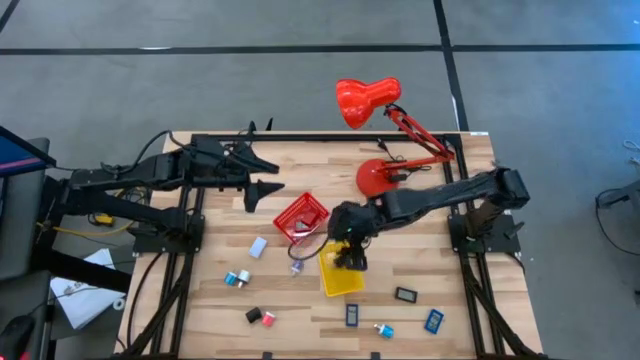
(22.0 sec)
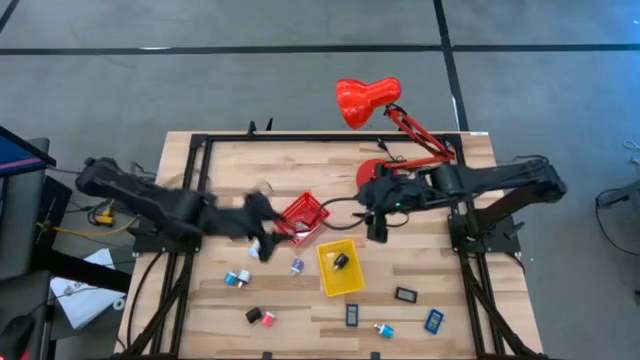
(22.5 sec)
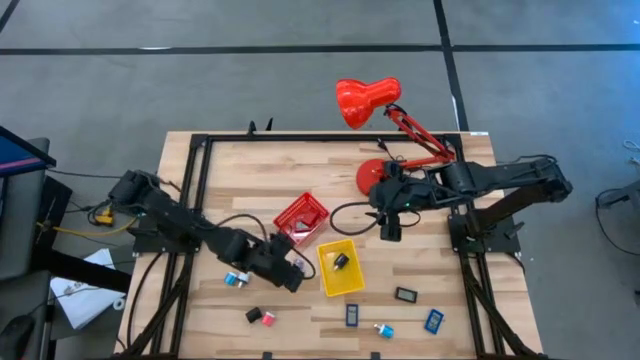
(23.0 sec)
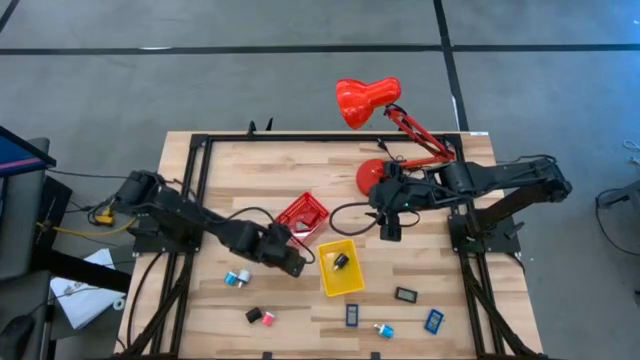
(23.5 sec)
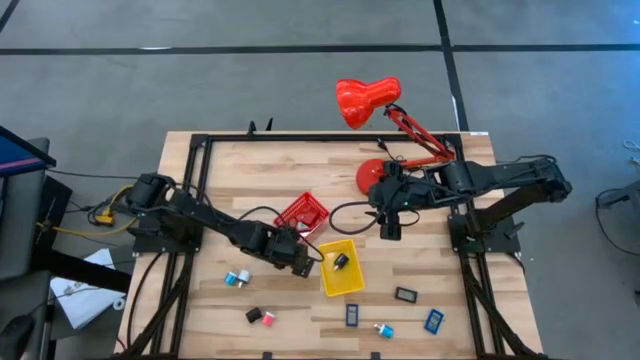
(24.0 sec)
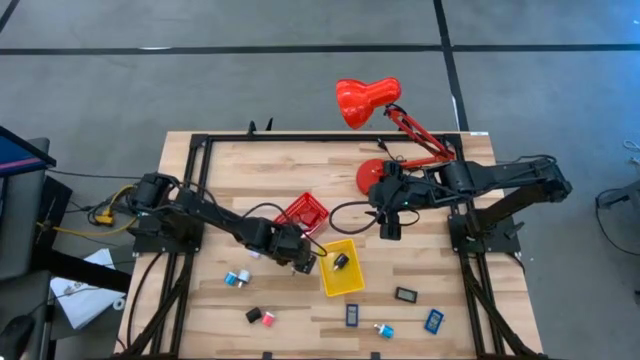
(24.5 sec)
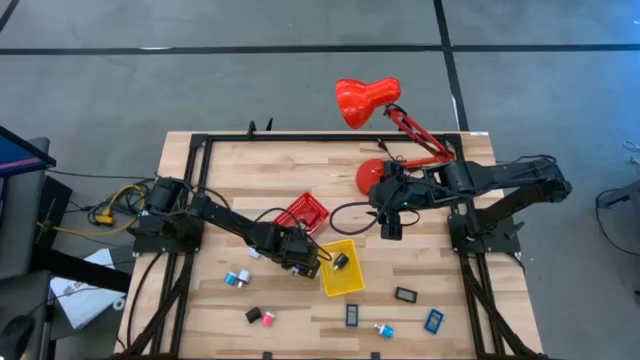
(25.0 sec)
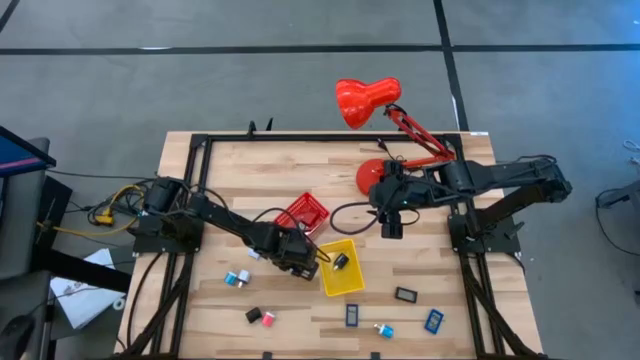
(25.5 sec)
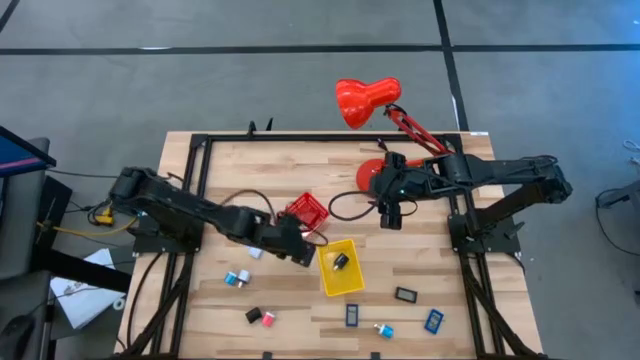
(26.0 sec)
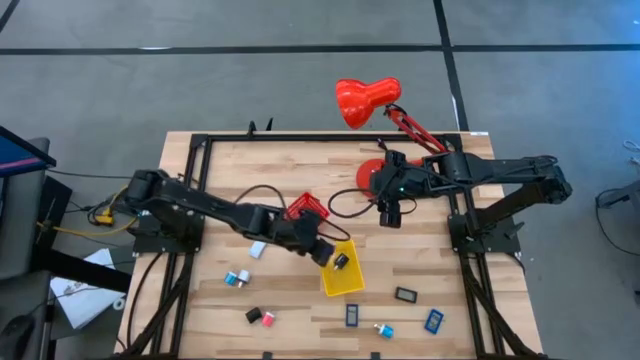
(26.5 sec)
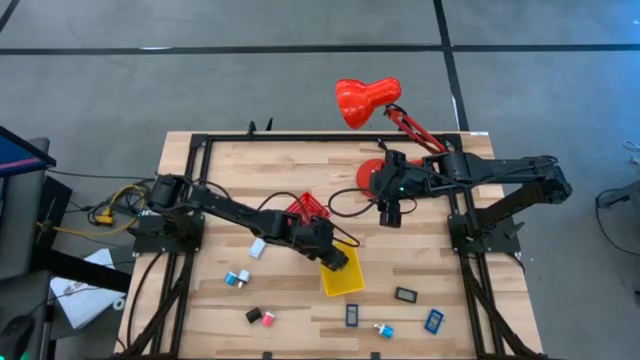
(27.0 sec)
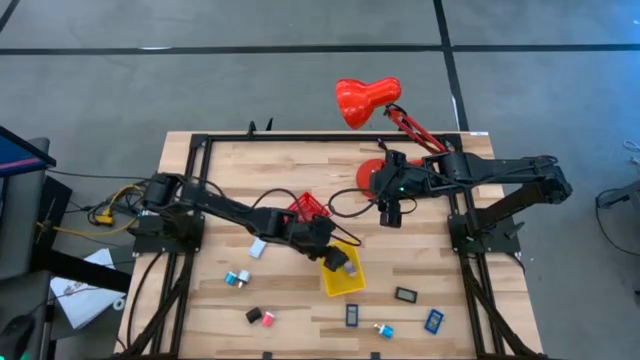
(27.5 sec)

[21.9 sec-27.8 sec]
Task: Pick & Place Office items
Put the violet charger adapter into the yellow basket

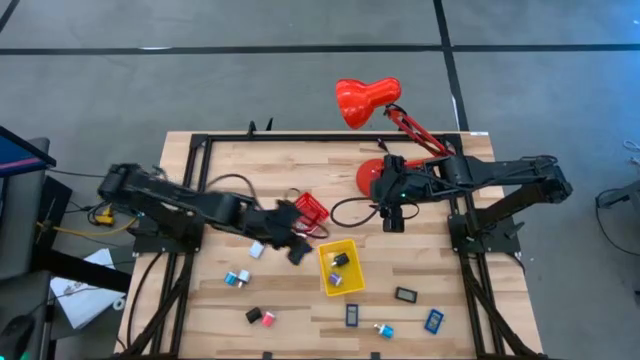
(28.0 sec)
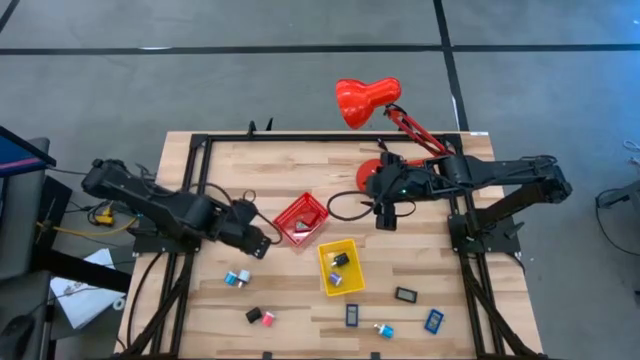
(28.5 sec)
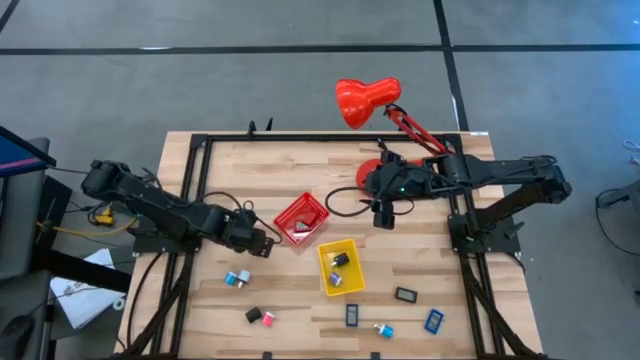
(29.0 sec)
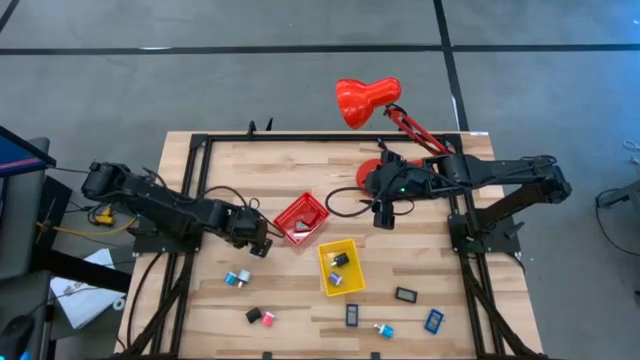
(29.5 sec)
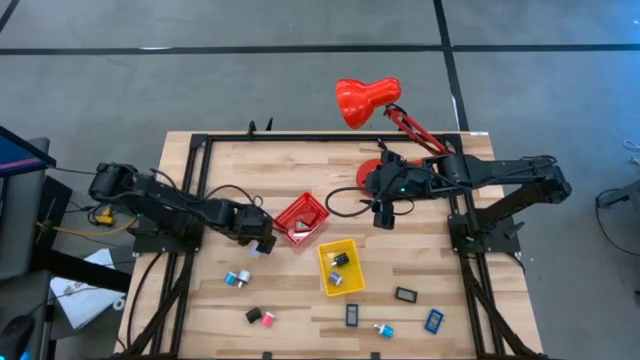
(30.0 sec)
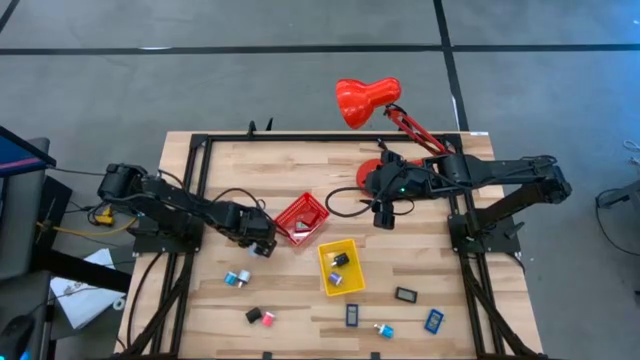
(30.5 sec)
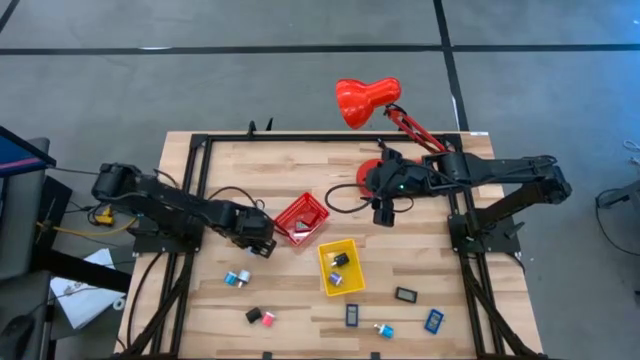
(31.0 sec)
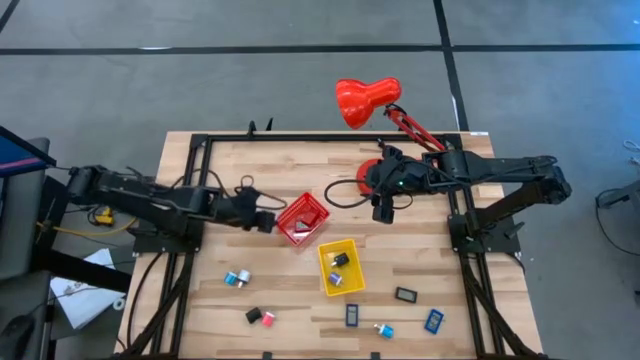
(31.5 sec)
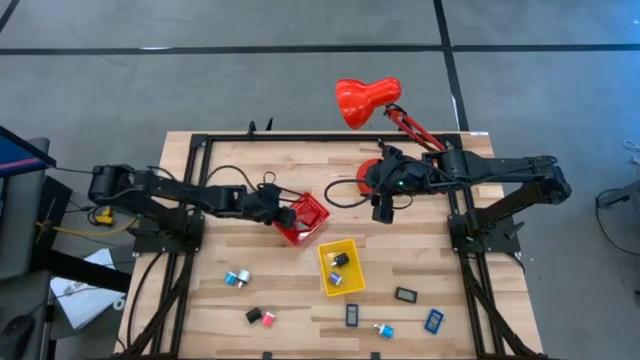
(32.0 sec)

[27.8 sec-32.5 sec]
Put the white digital clock into the red basket

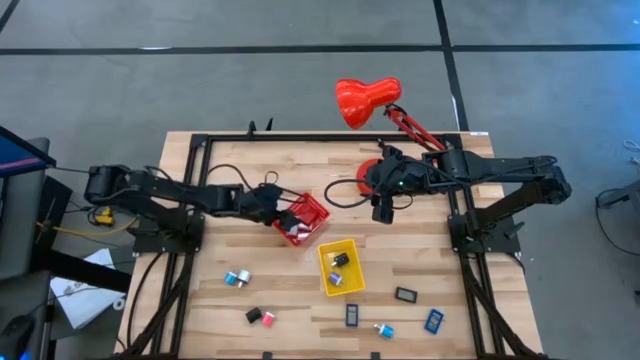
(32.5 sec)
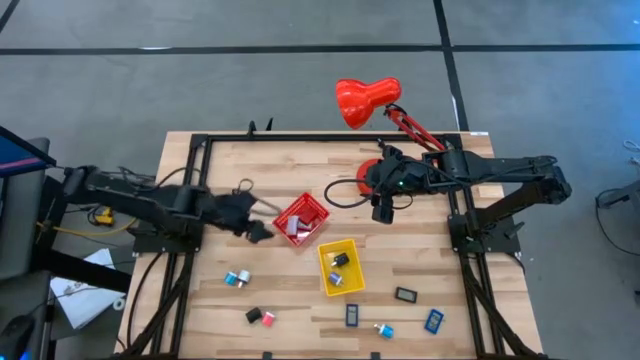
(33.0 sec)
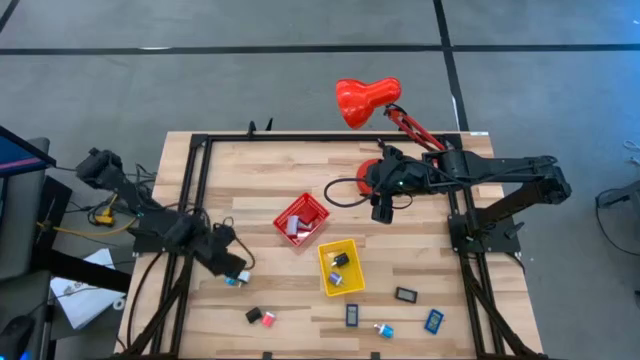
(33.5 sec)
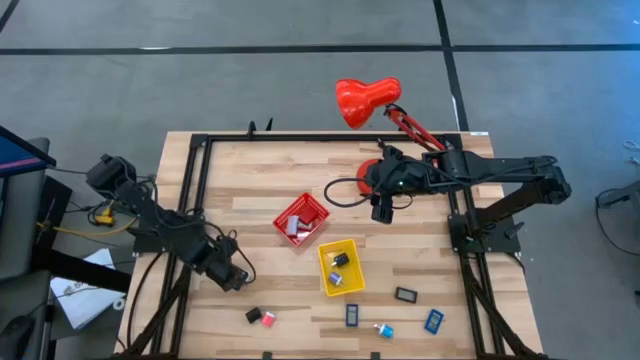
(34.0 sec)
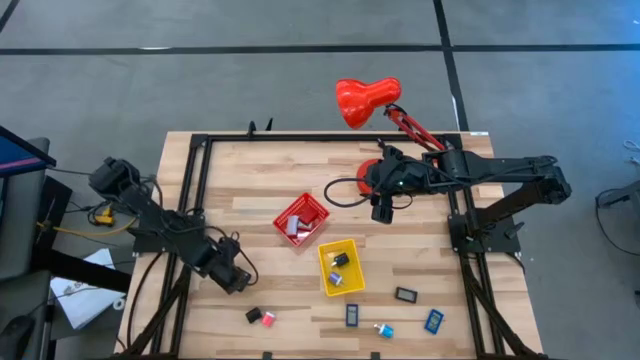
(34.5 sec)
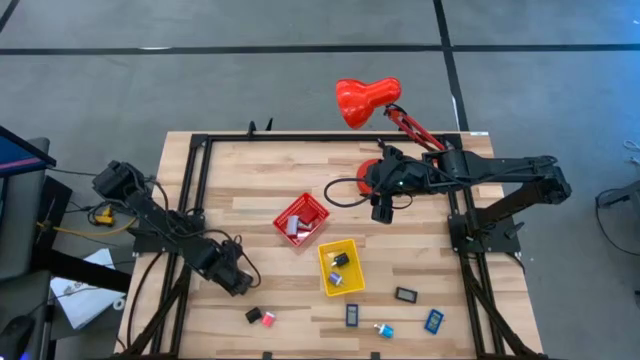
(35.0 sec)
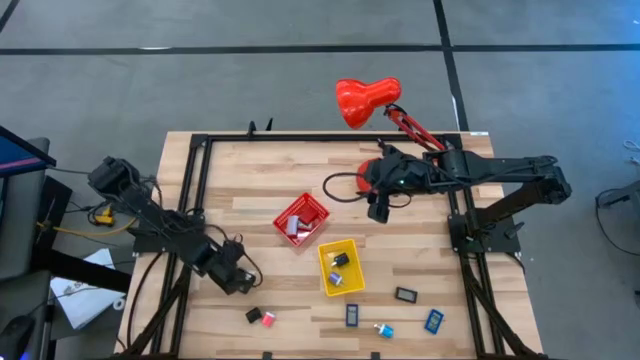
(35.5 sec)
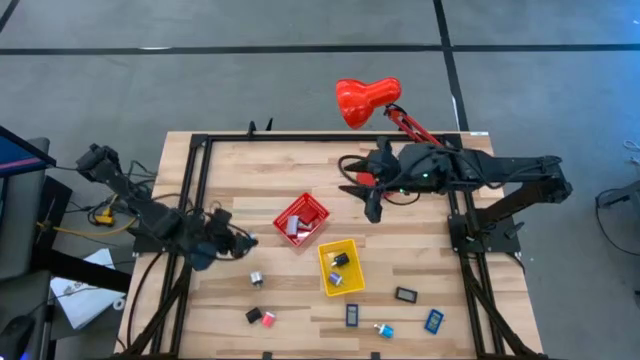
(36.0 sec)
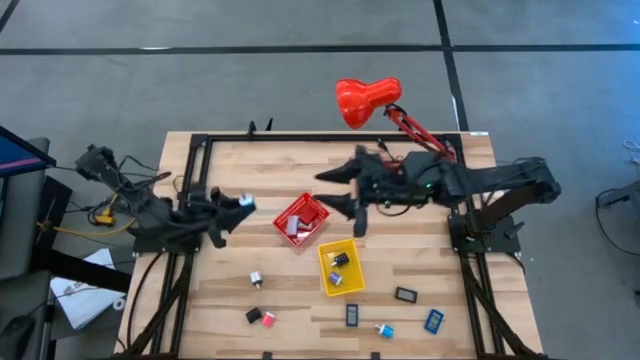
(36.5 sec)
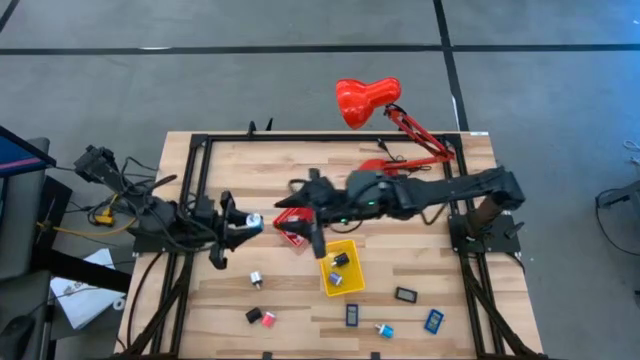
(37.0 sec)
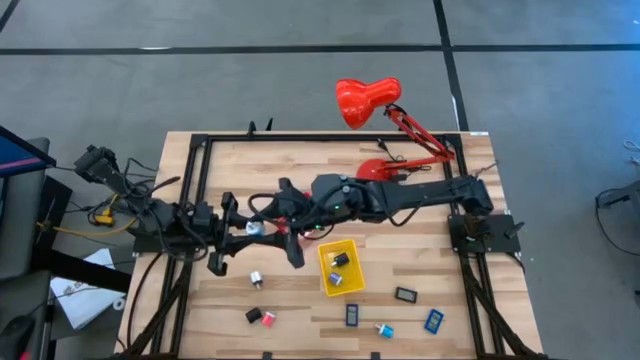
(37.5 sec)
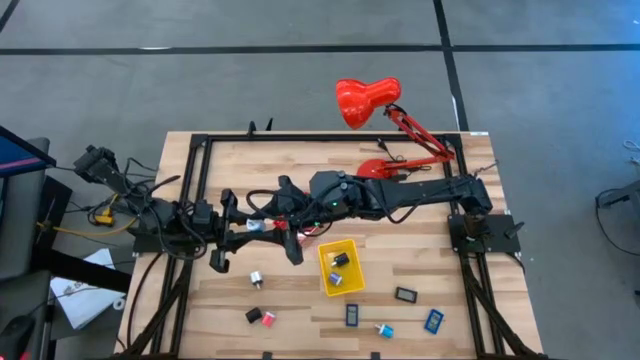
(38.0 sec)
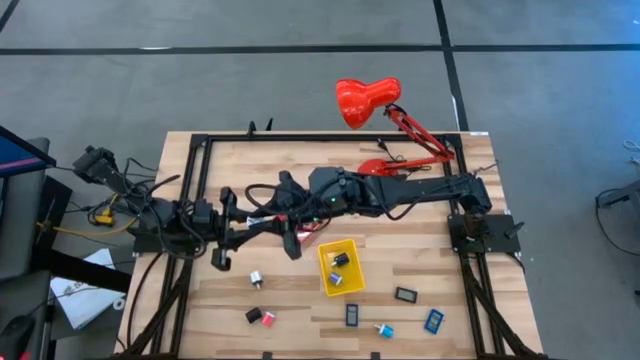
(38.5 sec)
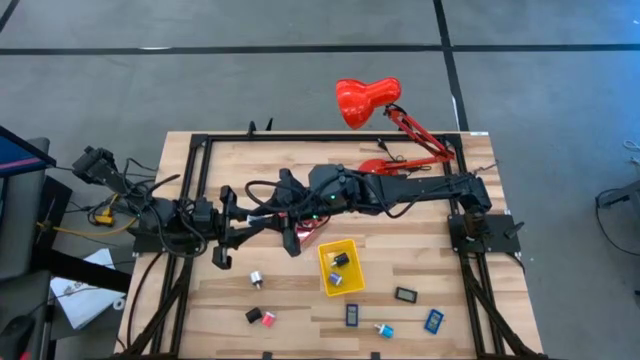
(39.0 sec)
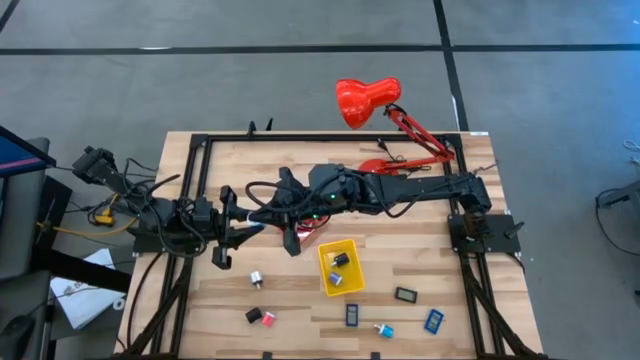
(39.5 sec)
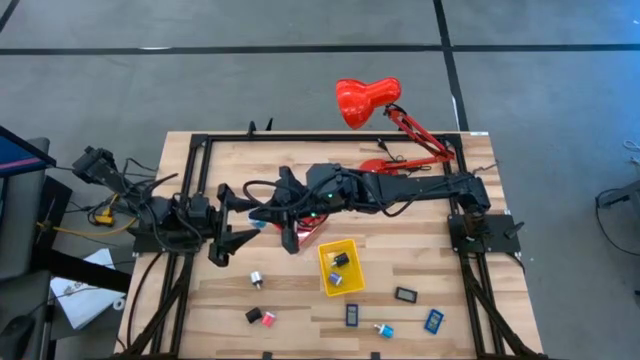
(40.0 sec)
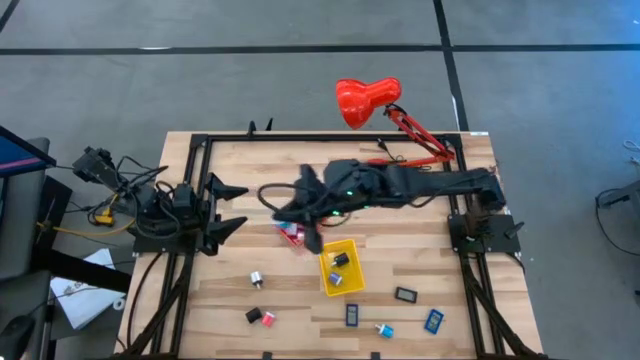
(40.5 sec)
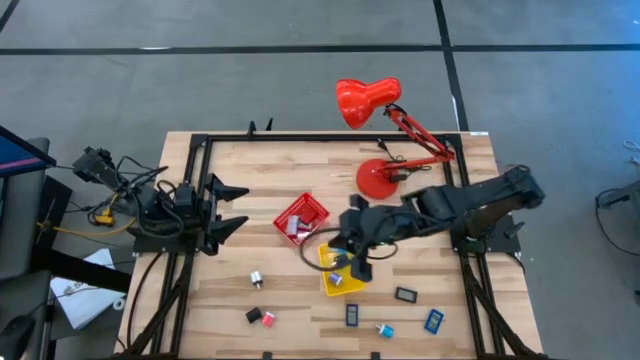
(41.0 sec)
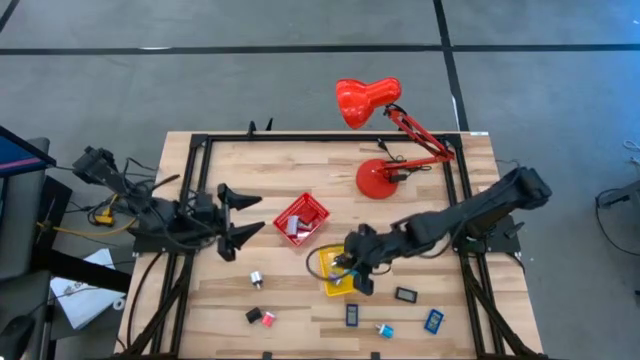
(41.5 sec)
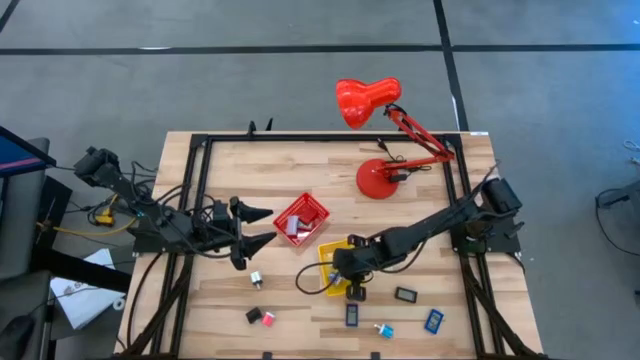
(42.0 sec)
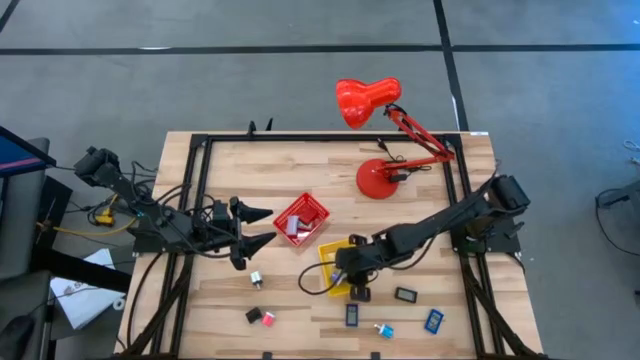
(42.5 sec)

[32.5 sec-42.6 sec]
Put the left blue charger adapter into the yellow basket

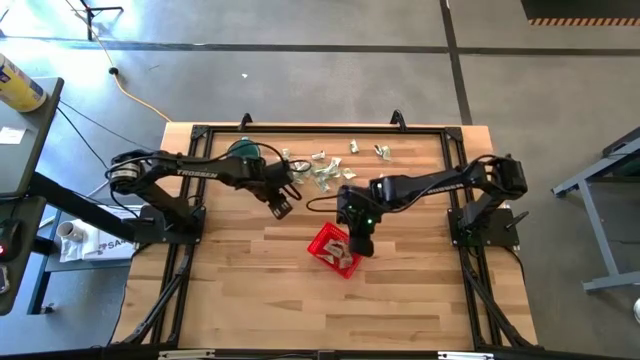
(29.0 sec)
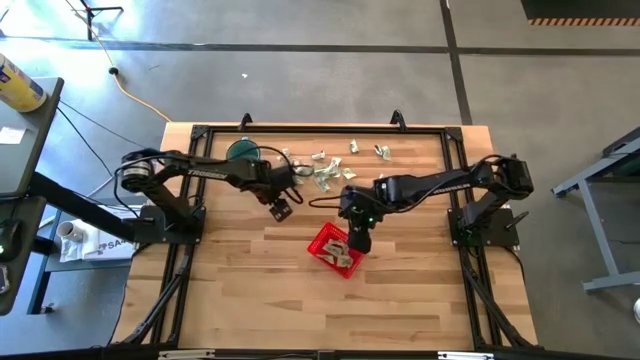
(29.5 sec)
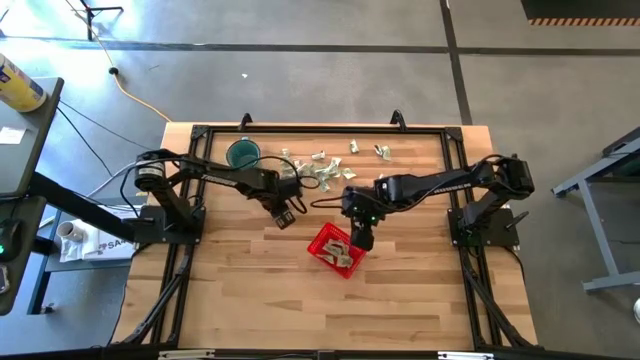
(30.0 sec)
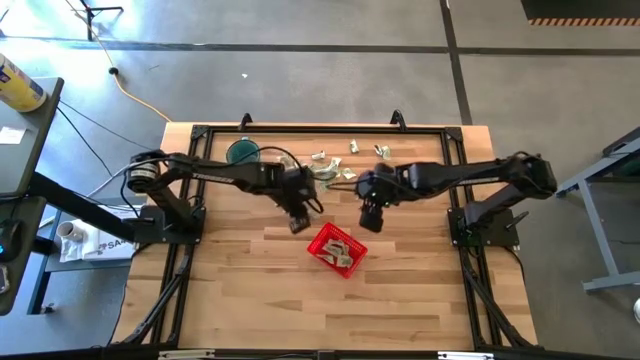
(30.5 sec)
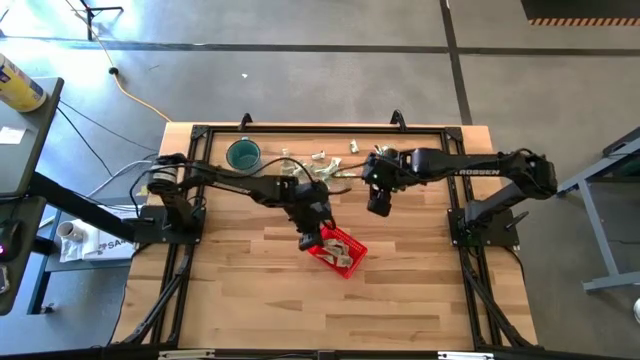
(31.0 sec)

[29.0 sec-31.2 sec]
Task: Pick and place Stevia / Truvia into bins
Put the light green stevia packet into the bin
